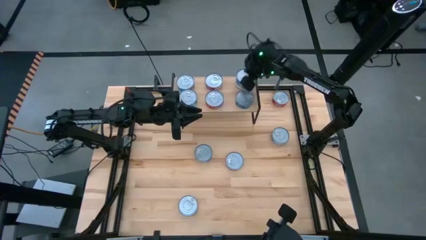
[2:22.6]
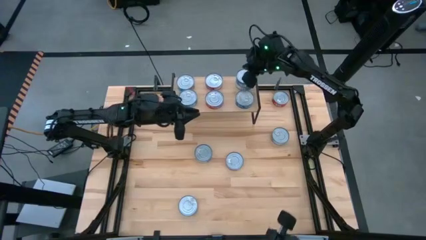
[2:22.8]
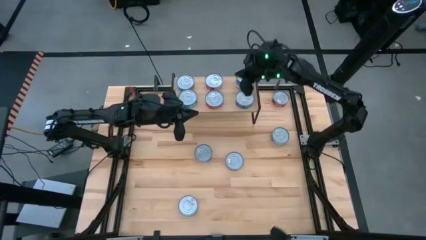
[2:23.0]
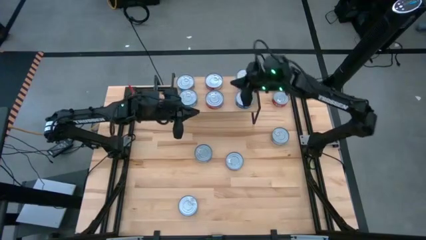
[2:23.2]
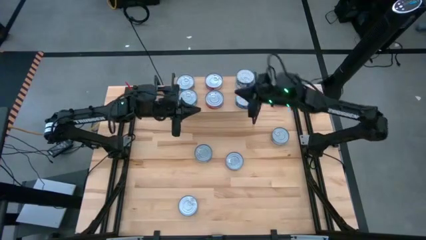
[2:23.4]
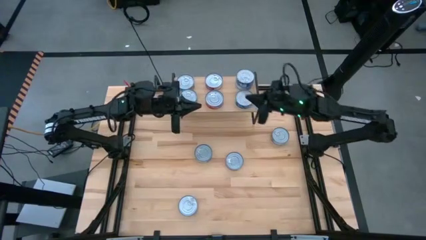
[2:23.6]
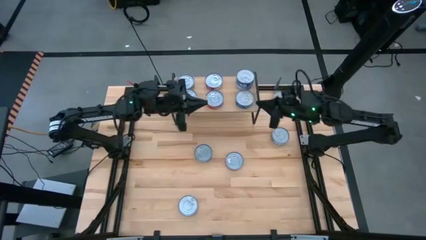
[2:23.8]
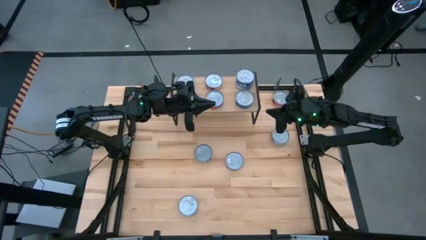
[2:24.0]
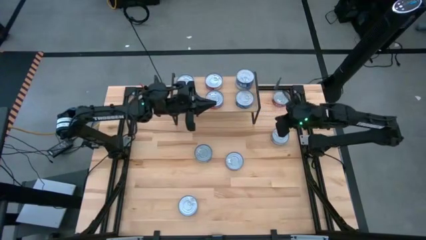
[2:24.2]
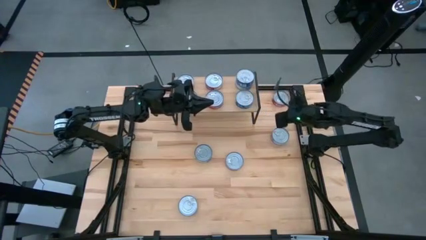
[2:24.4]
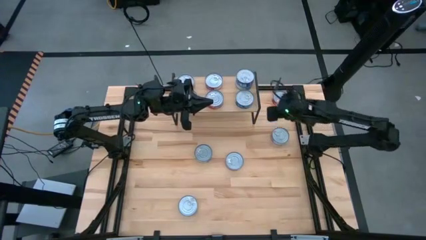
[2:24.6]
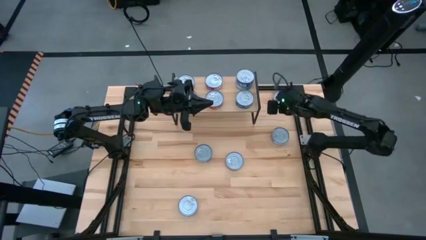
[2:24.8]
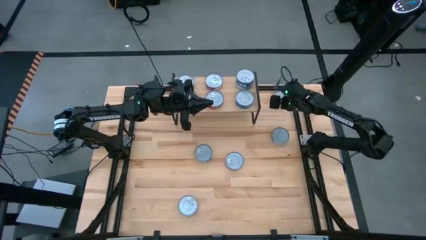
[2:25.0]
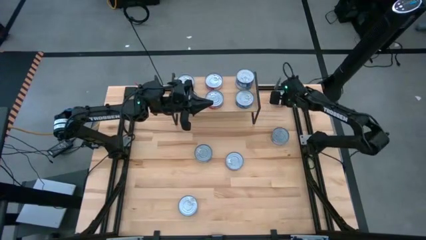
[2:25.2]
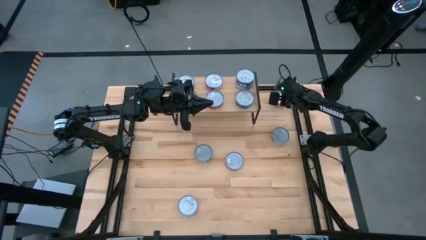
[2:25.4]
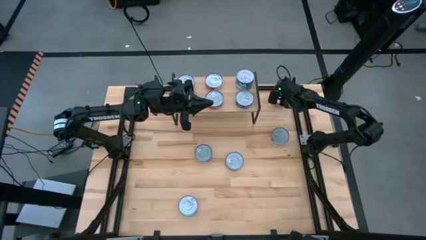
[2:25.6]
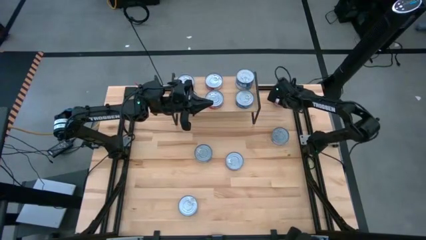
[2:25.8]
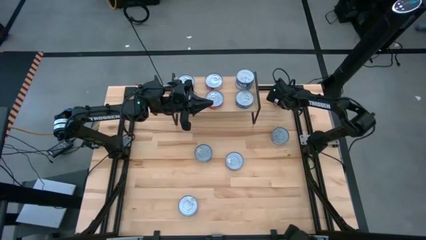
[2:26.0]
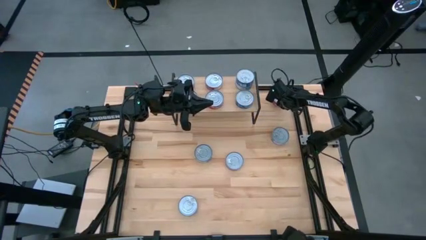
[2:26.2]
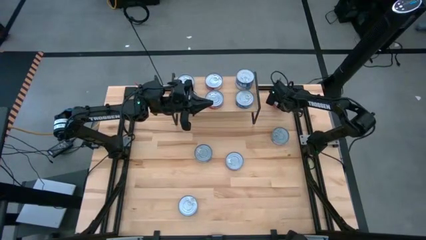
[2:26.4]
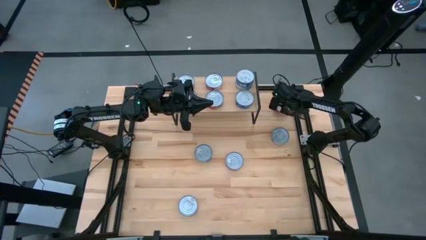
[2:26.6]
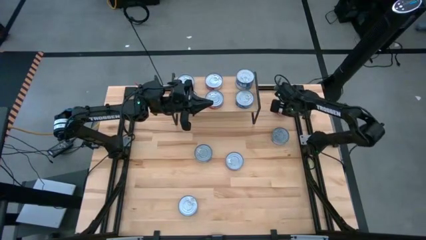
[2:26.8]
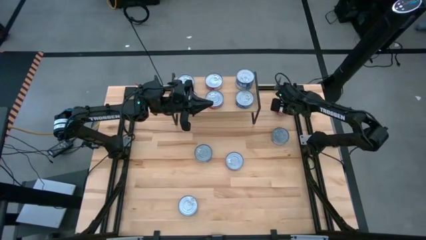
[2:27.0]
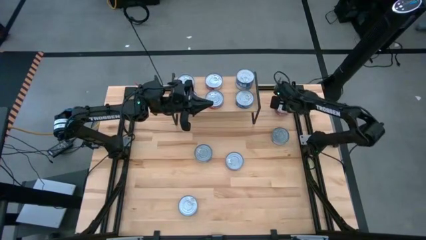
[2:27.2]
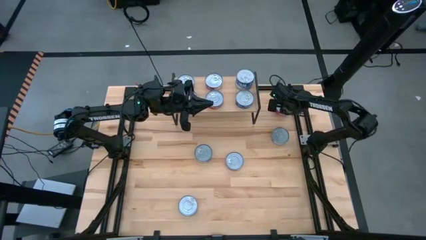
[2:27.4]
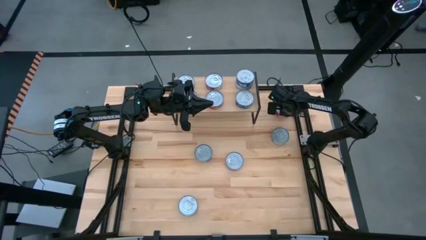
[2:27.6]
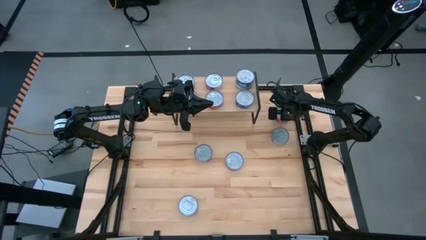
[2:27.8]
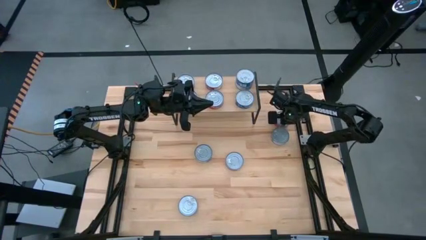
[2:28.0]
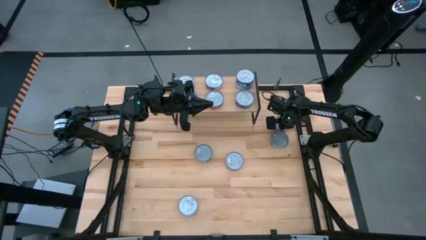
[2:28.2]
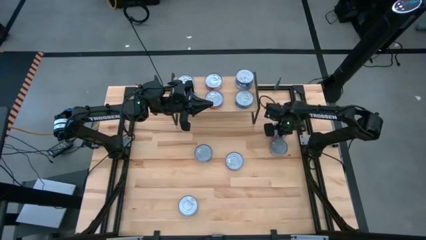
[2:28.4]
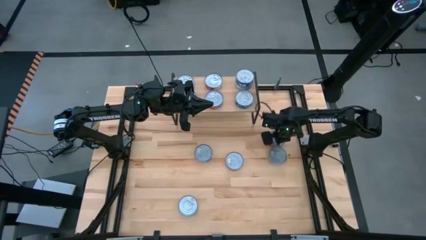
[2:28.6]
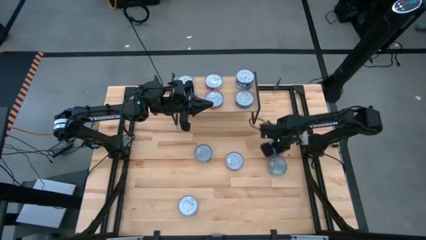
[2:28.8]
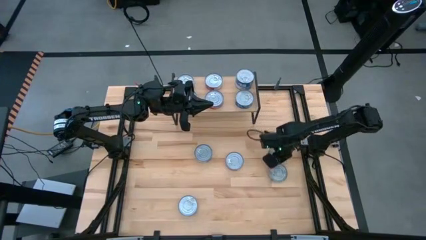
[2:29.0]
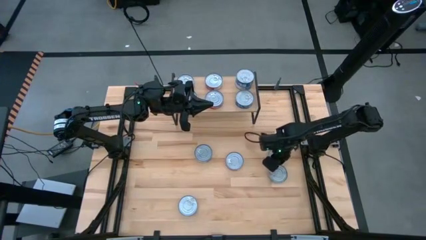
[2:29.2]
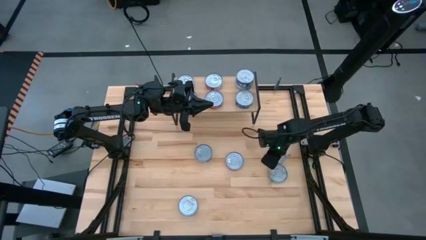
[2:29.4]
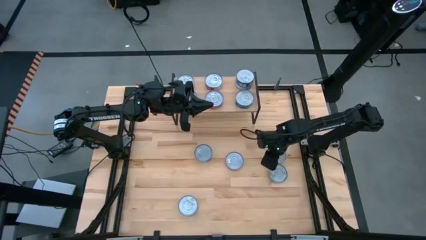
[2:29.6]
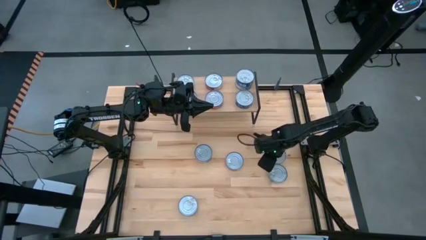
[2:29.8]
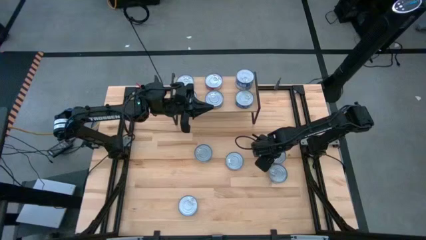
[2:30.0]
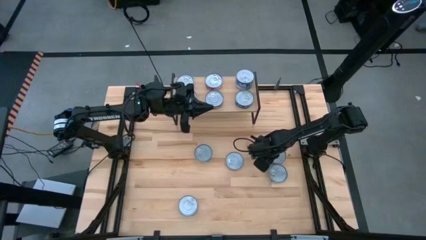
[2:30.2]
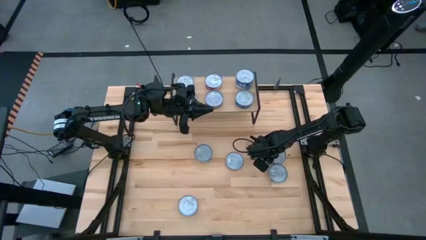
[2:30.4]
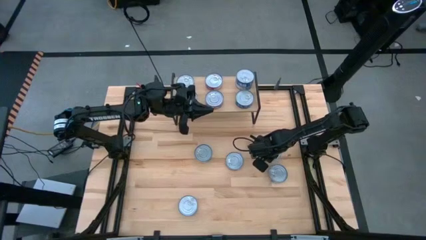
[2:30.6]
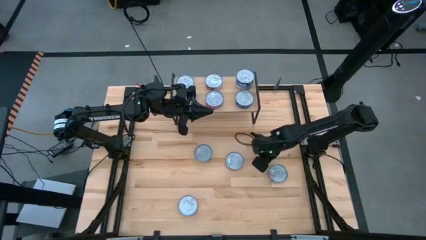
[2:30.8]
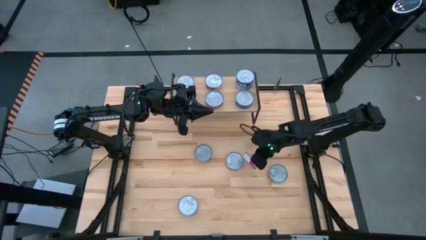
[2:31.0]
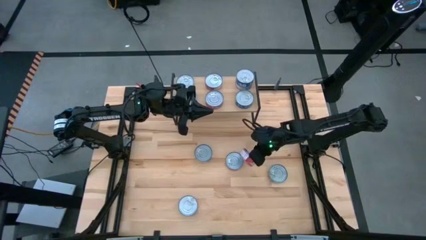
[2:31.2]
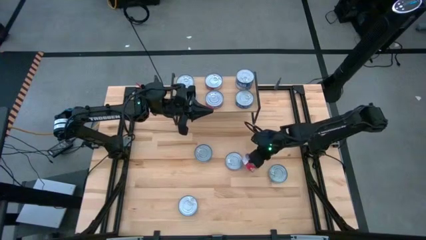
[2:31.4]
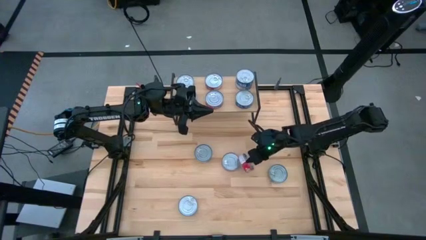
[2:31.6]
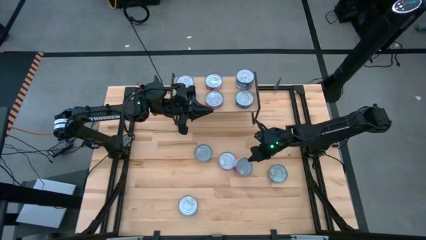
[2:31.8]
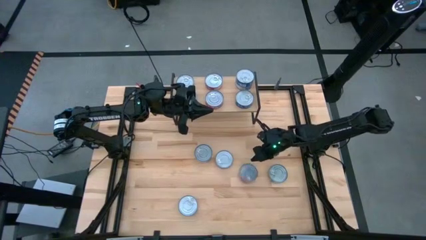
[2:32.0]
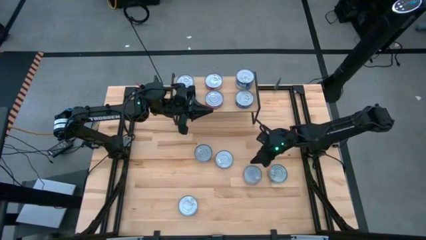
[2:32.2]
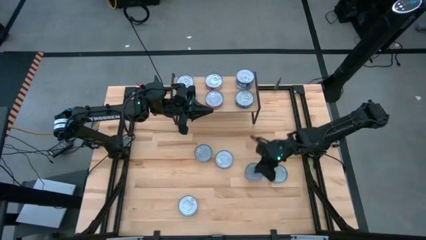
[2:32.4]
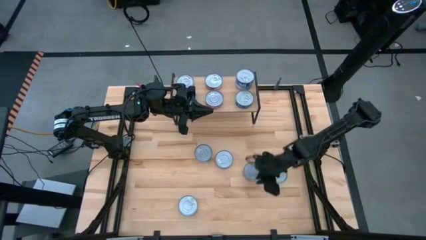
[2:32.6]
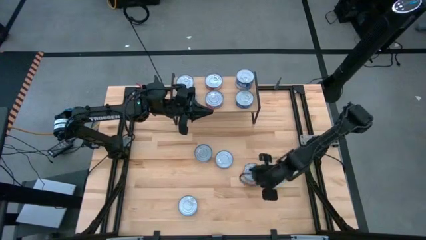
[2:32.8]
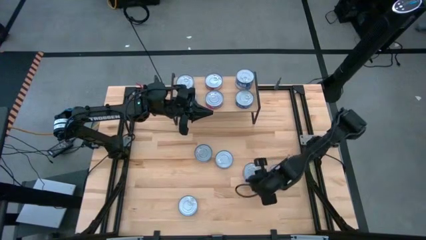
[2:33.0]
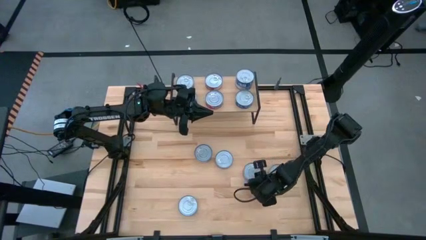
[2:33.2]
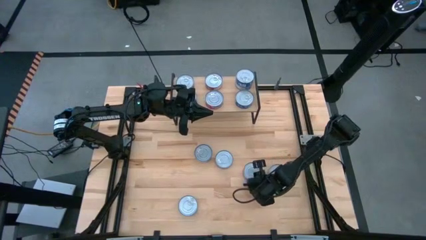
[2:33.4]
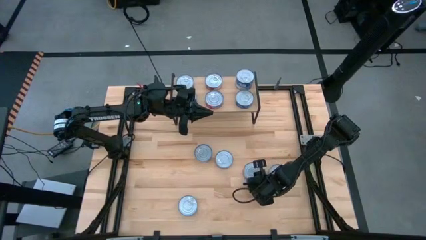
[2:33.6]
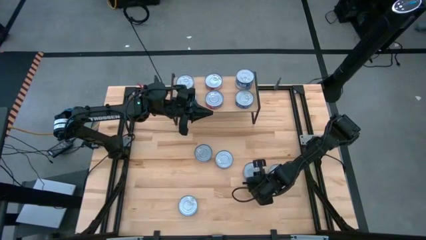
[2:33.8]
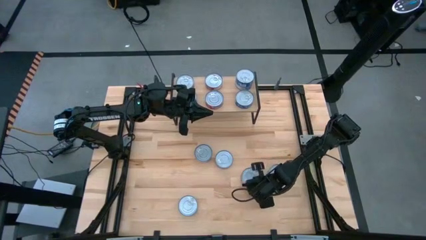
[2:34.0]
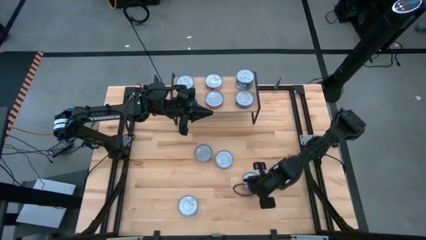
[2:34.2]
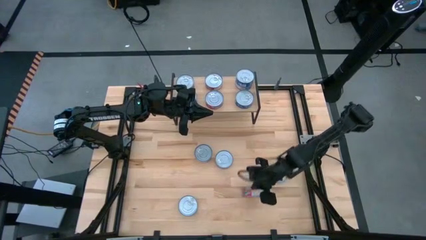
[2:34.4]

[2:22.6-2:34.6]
Task: Stack canned seafood by type on shelf
Stack the top red tuna can on top of the other red tuna can on the shelf

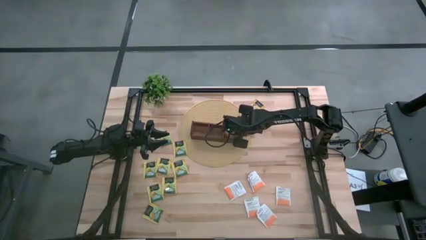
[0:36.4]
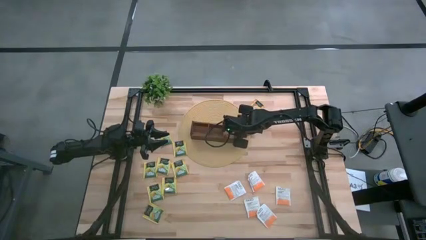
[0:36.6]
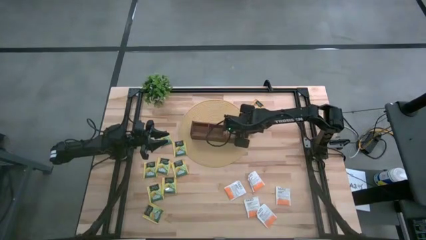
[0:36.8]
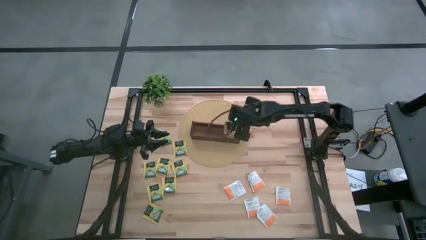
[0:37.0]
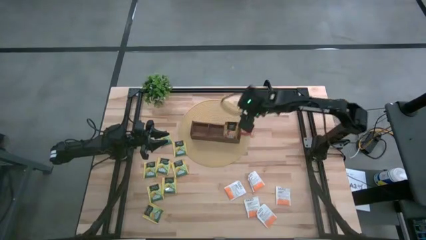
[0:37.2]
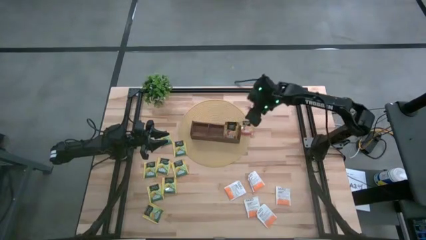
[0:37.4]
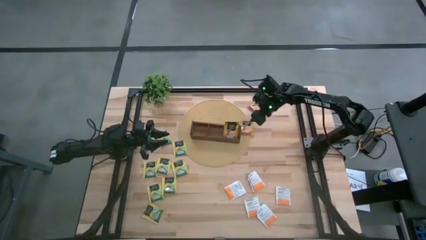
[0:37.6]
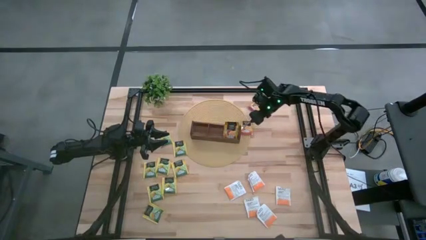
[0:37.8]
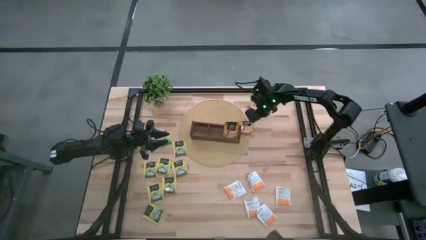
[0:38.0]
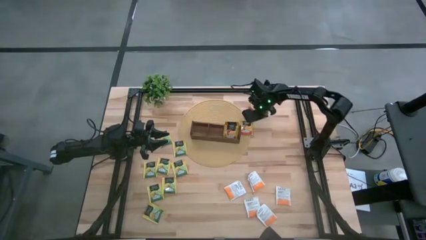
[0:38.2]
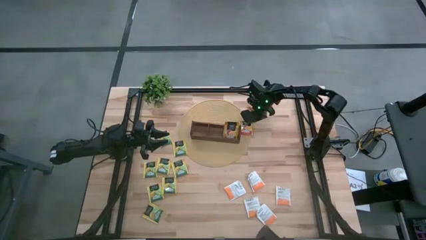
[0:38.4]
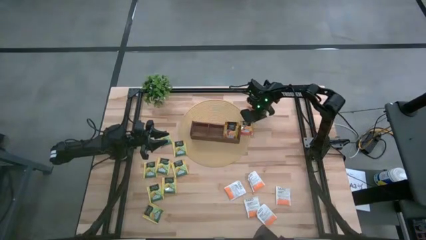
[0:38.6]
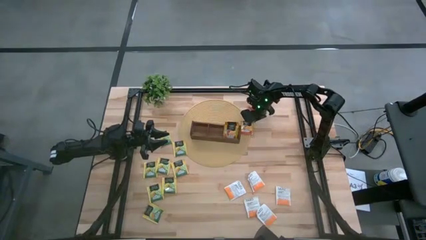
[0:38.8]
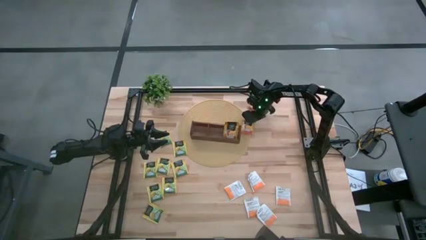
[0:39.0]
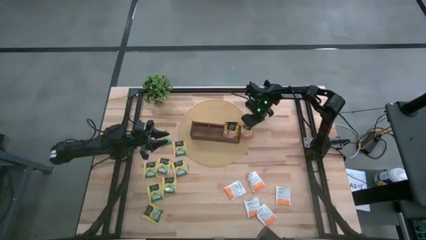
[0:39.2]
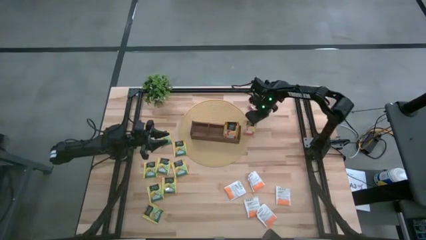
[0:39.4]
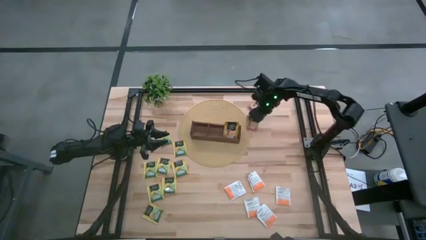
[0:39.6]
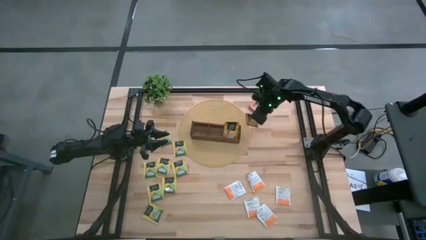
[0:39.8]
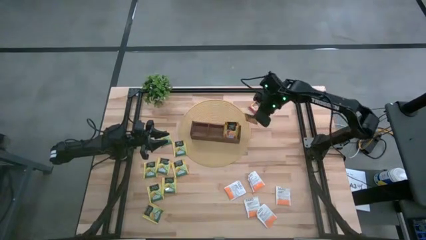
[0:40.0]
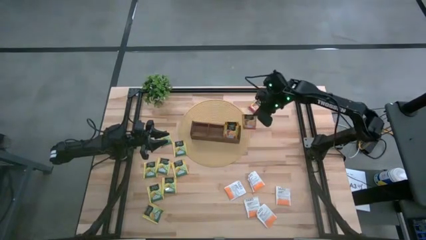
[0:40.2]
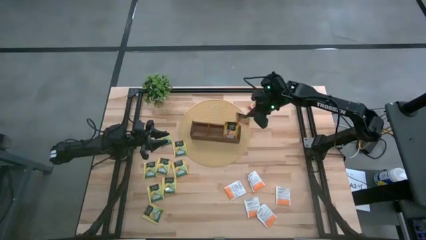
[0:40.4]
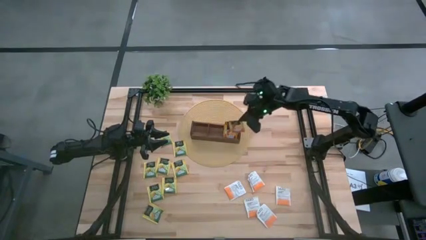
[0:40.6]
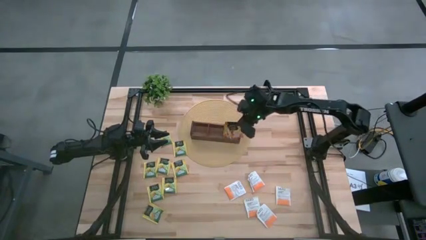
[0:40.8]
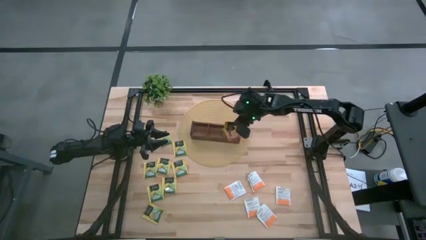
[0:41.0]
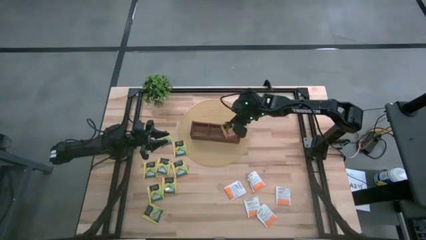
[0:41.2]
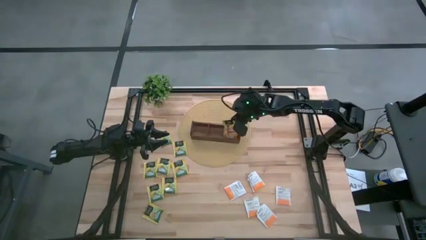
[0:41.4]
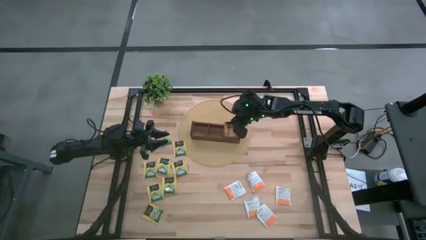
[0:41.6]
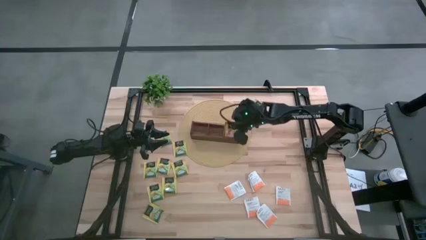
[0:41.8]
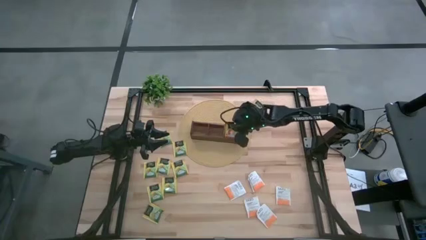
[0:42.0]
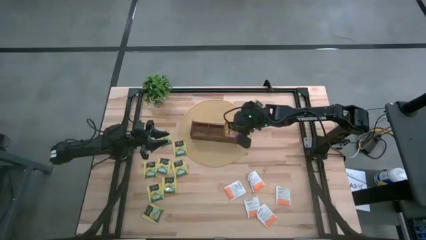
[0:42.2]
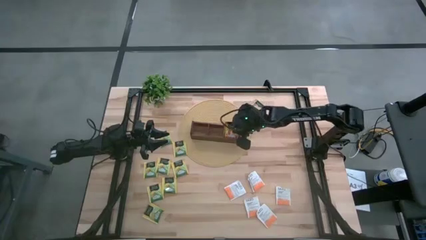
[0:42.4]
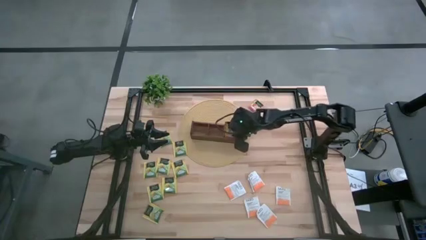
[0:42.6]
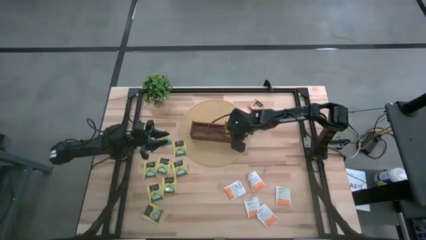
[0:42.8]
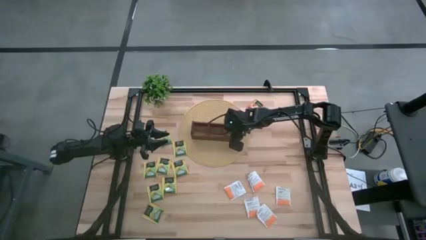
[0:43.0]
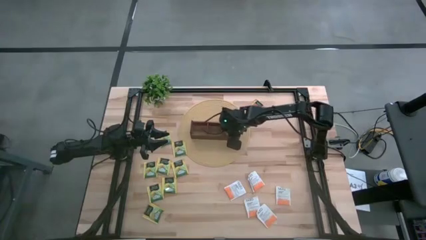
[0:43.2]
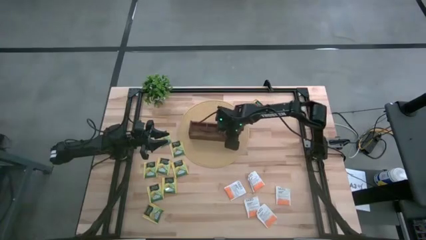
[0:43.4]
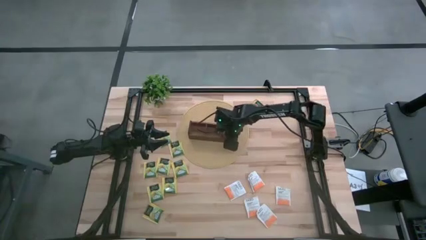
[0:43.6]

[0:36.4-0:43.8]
Task: Pick & Place Tea
Put the dark yellow tea bag into the right section of the wooden organizer
